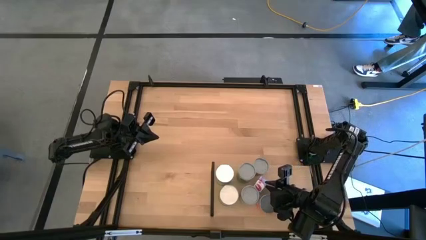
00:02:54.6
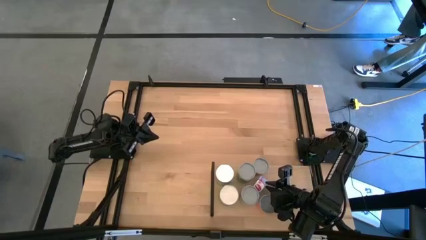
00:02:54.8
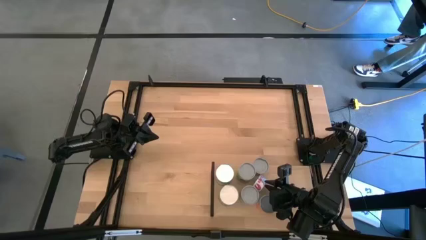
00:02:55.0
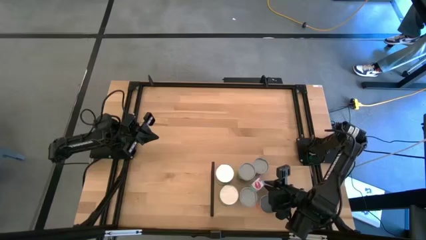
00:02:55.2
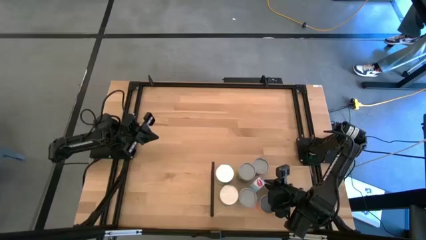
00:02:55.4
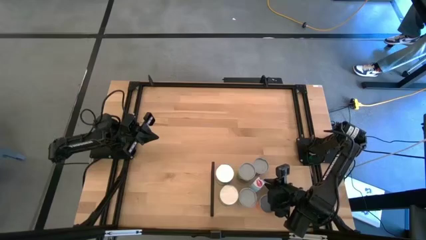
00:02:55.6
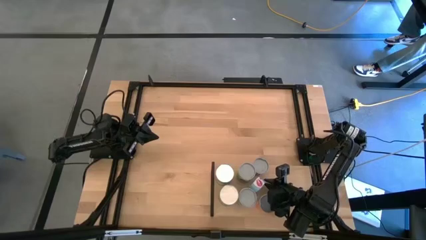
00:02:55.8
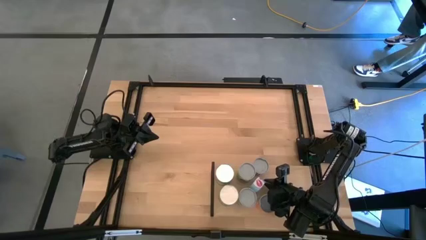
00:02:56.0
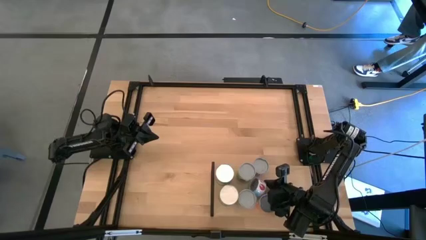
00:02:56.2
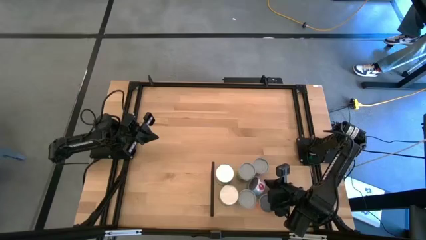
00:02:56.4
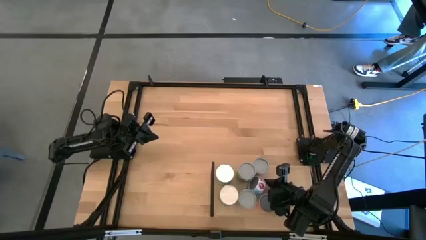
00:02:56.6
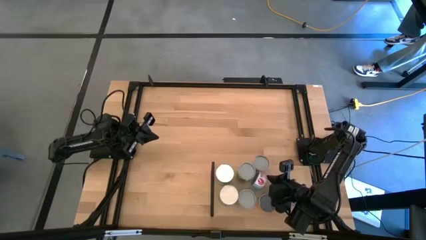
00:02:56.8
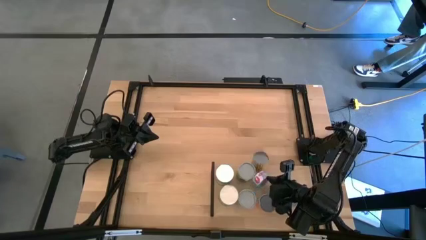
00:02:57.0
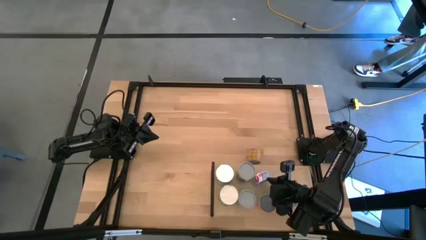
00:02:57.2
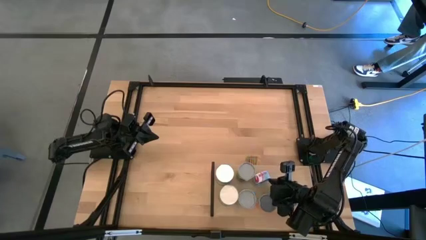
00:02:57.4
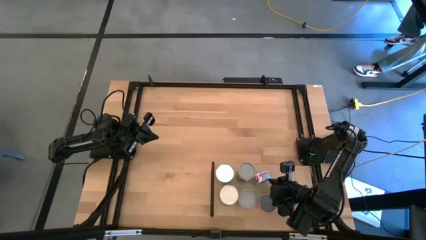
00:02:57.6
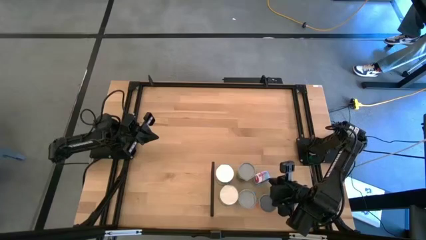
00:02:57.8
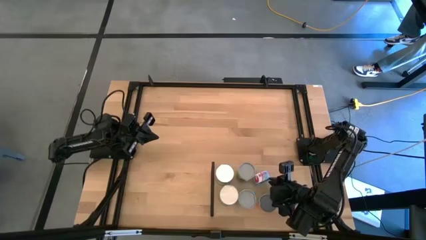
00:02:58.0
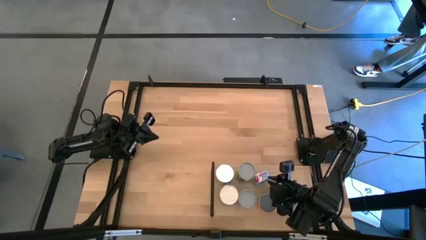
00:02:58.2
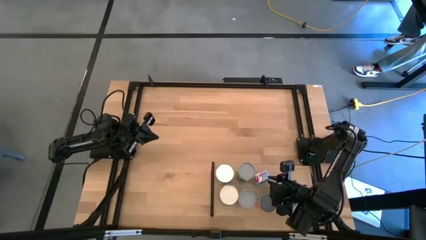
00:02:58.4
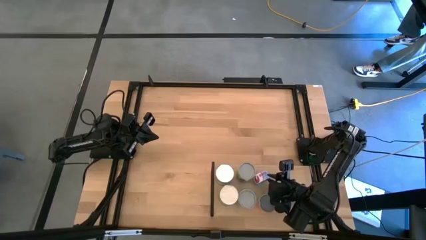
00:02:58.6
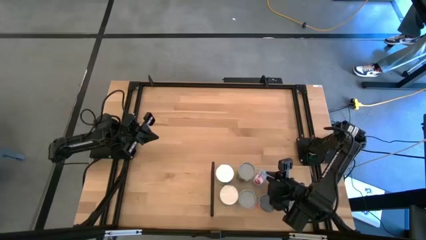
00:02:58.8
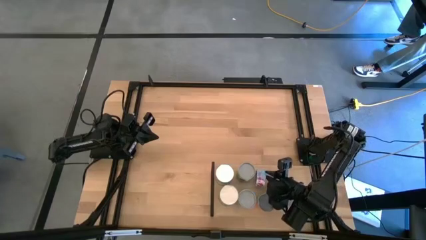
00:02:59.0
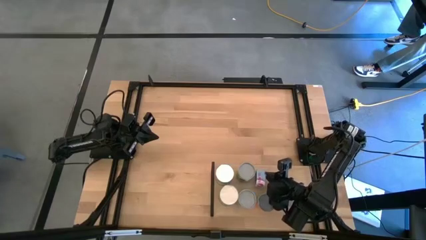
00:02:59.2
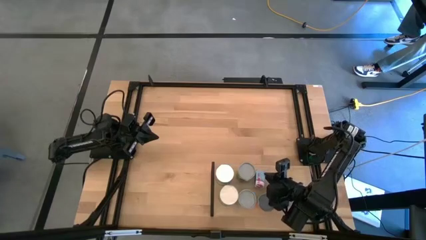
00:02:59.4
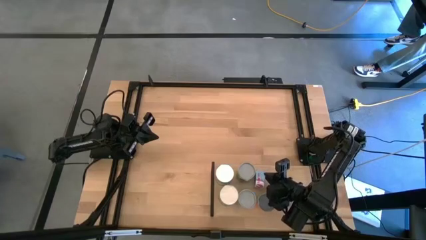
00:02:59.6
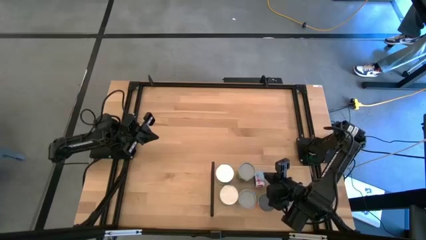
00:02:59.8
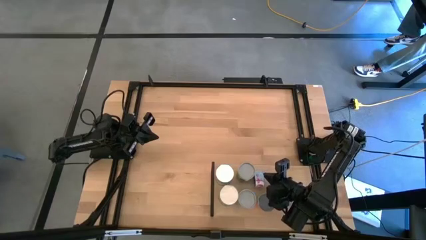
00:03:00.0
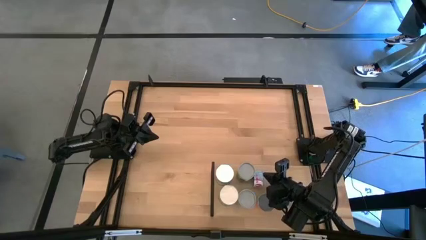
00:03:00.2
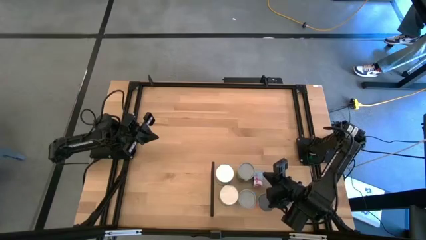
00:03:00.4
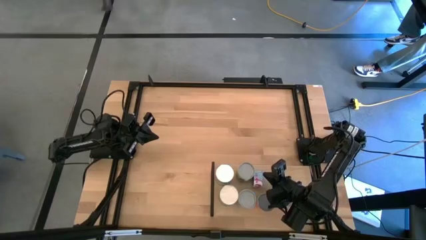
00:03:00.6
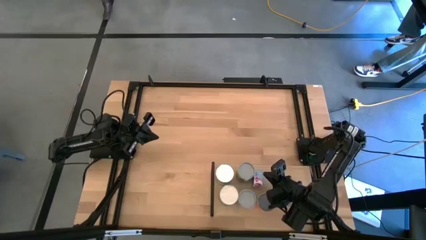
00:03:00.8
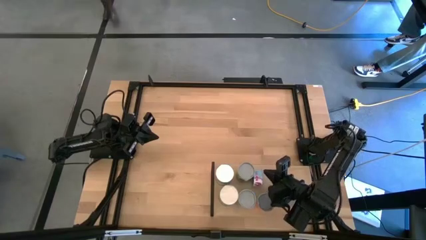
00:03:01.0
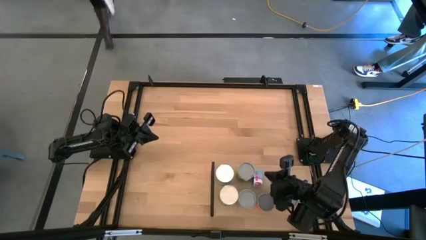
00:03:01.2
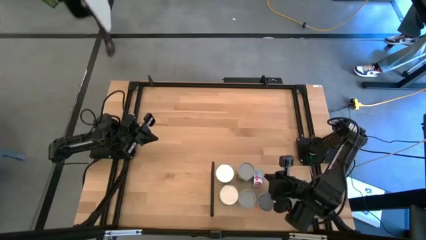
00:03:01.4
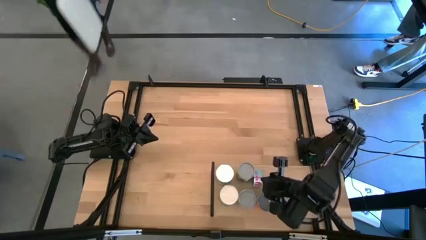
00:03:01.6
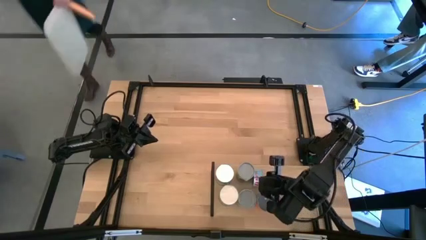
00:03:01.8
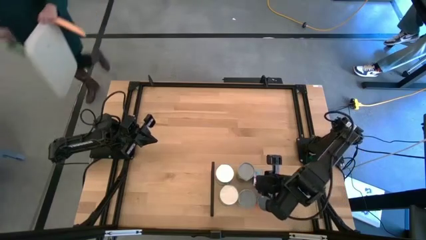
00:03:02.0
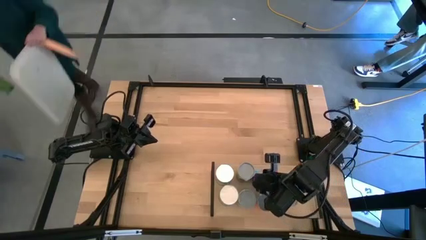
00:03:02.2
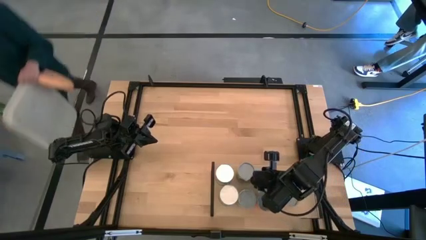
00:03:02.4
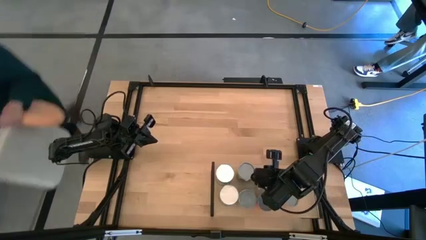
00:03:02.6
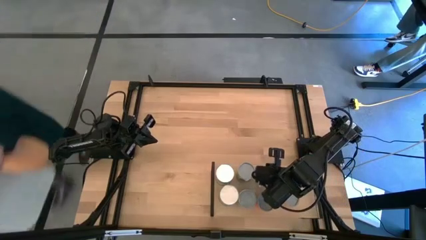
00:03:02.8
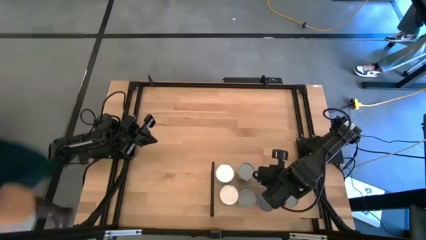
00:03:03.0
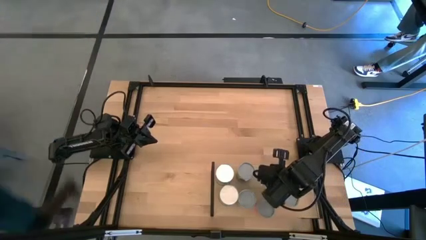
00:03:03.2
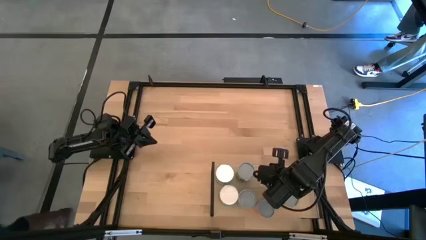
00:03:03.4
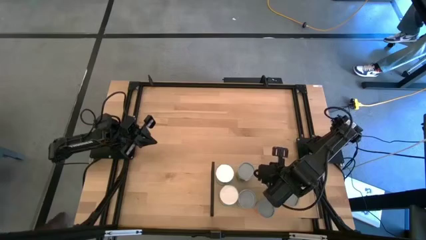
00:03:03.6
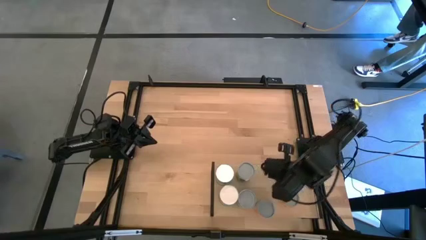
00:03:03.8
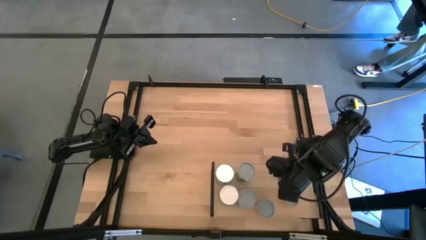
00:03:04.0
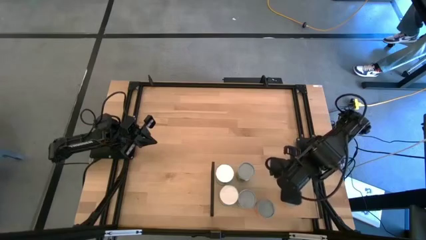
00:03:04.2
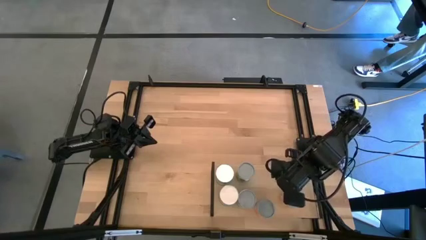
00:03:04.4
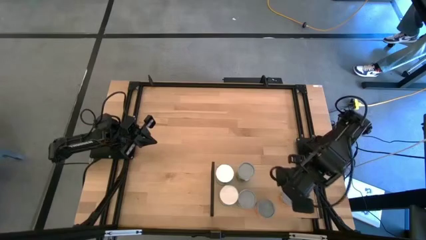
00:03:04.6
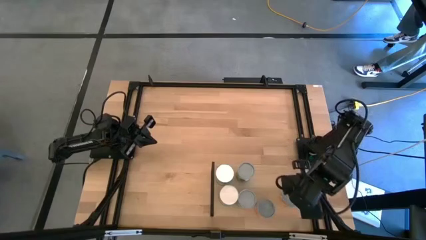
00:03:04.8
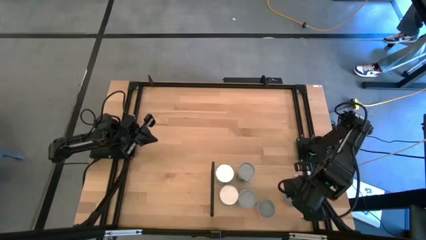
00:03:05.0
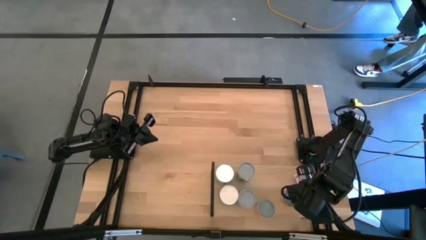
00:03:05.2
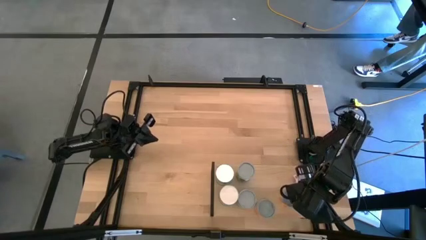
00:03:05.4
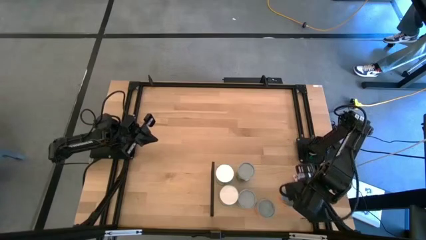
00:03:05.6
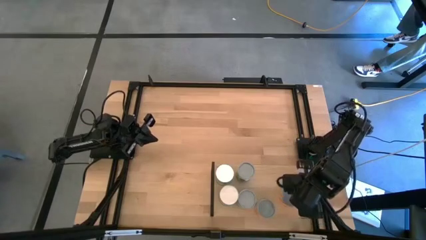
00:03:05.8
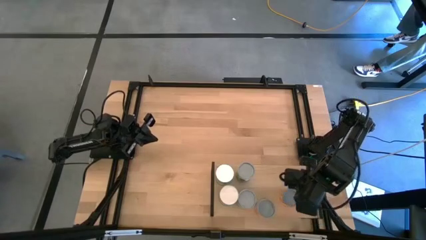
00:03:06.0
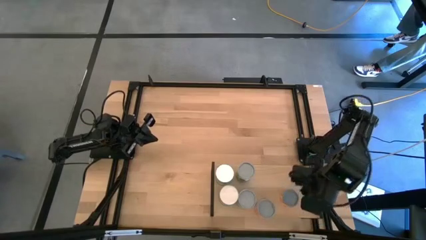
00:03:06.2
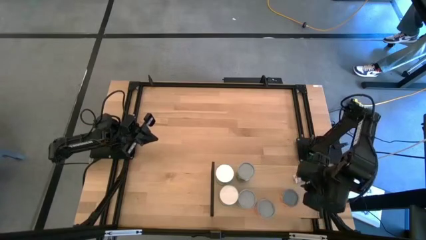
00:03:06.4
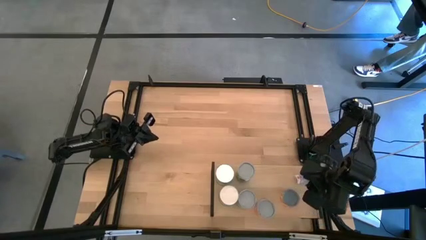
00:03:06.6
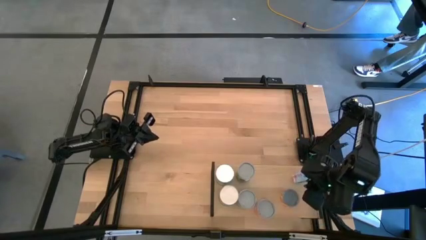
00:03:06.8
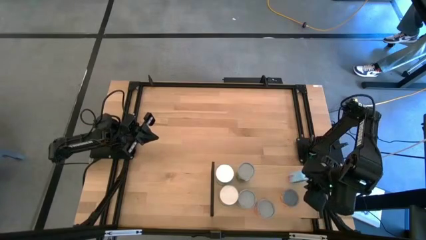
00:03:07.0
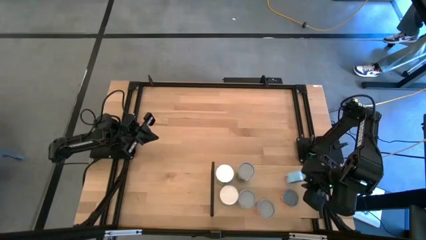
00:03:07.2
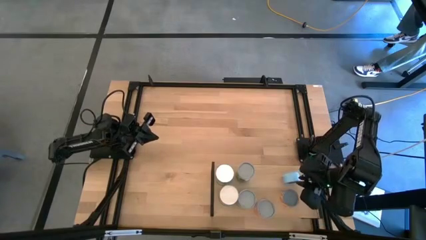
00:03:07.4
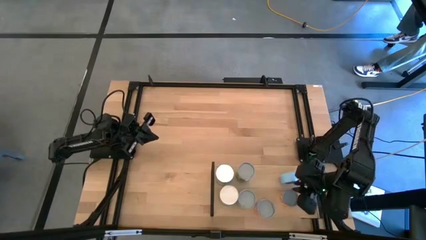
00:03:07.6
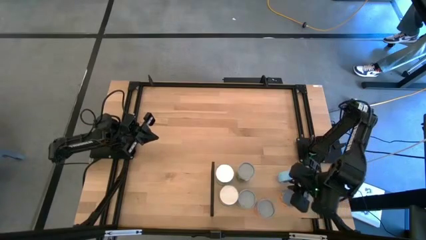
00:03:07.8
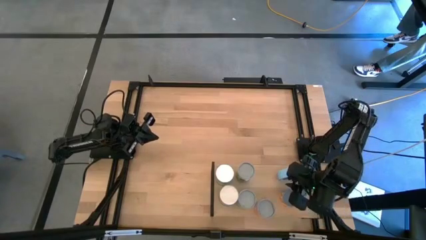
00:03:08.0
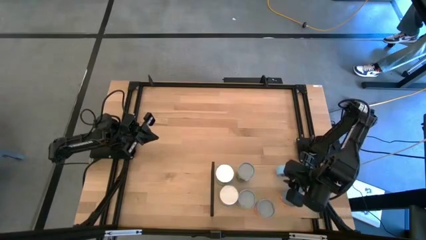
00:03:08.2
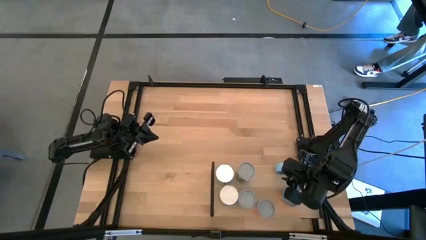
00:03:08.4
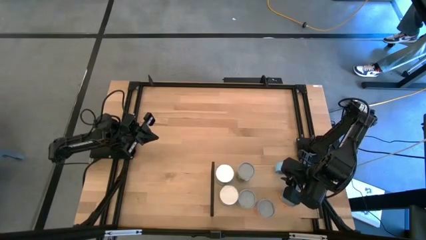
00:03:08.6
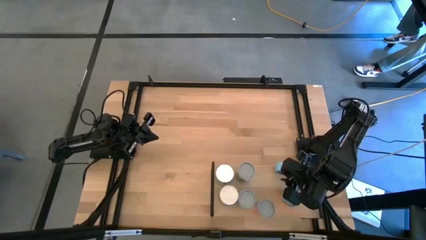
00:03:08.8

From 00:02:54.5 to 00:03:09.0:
Task: Pick and place cans onto a shelf
Adjust the tuna can on the shelf
